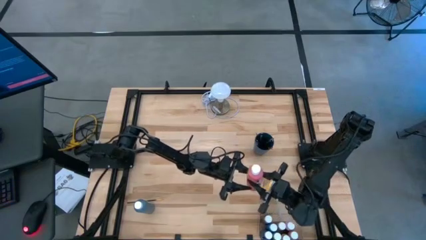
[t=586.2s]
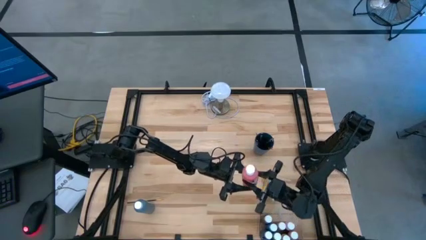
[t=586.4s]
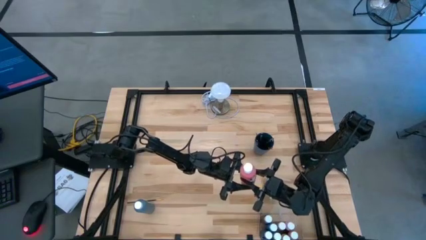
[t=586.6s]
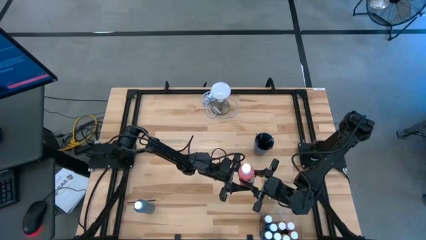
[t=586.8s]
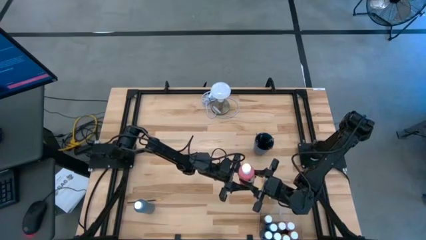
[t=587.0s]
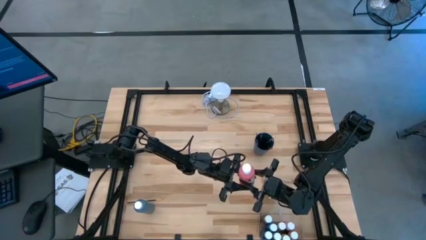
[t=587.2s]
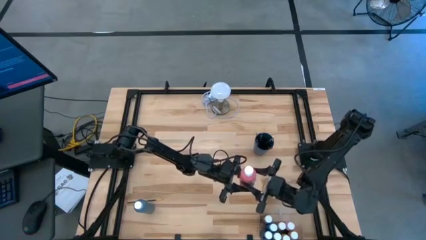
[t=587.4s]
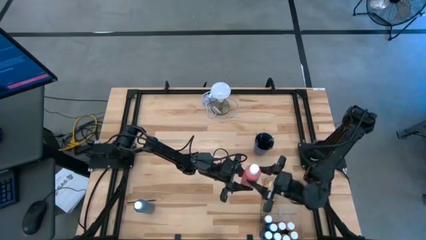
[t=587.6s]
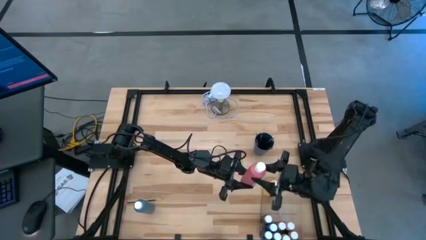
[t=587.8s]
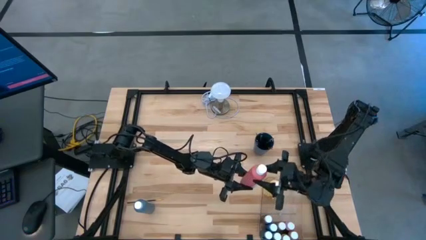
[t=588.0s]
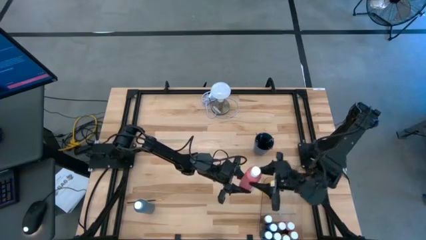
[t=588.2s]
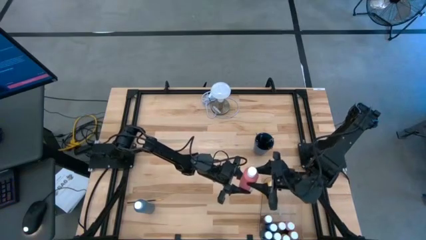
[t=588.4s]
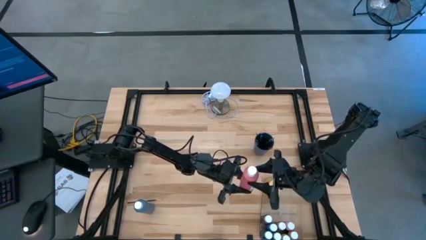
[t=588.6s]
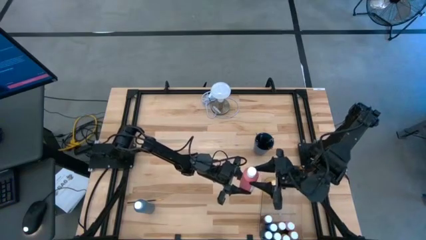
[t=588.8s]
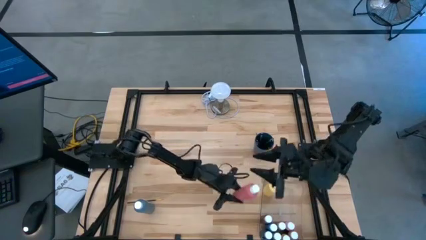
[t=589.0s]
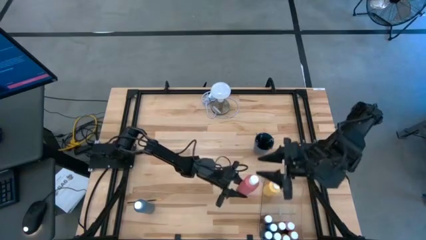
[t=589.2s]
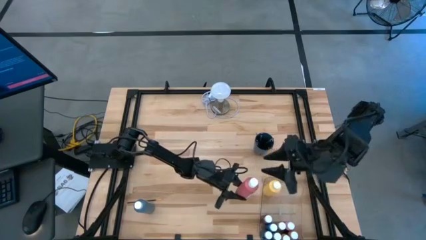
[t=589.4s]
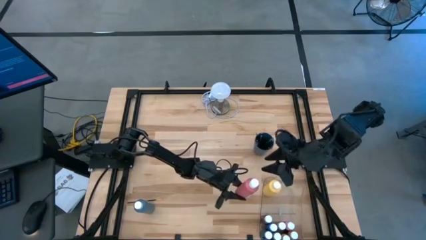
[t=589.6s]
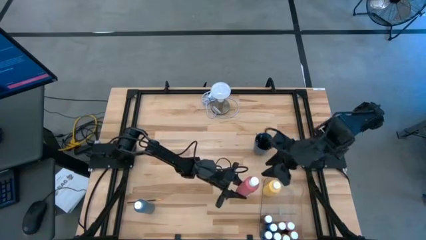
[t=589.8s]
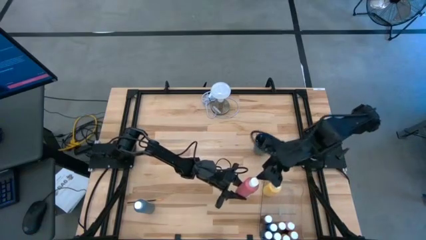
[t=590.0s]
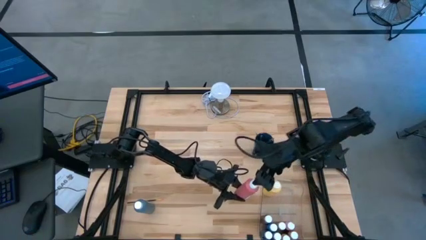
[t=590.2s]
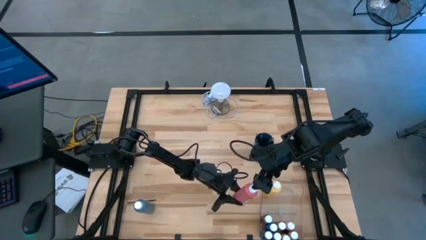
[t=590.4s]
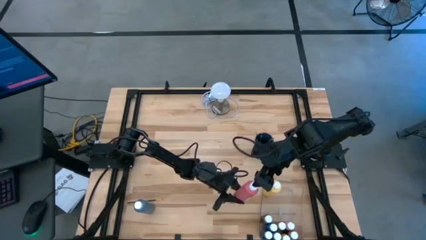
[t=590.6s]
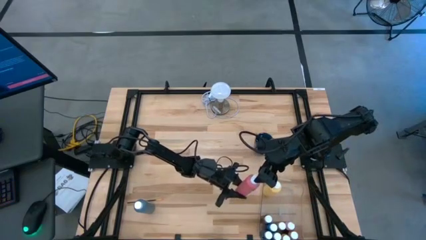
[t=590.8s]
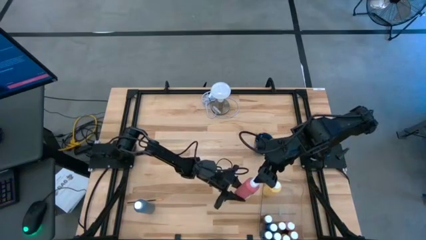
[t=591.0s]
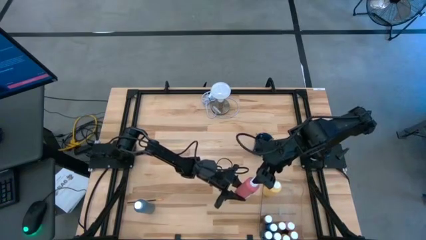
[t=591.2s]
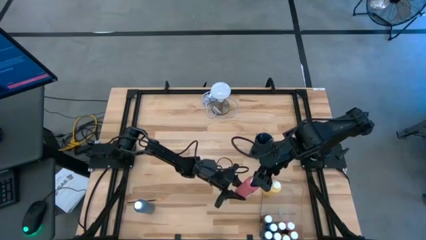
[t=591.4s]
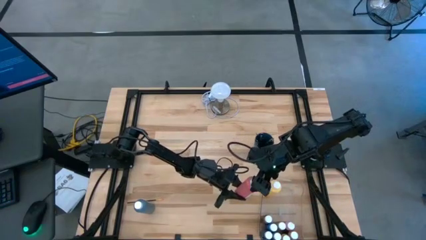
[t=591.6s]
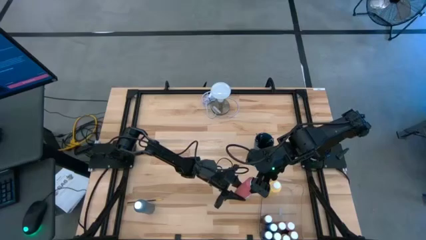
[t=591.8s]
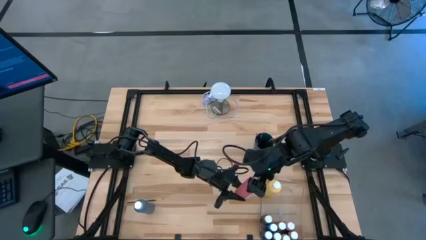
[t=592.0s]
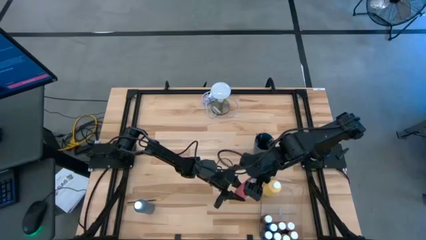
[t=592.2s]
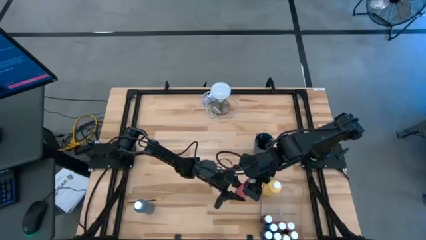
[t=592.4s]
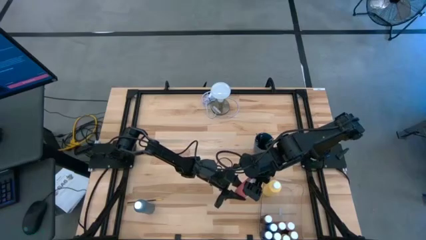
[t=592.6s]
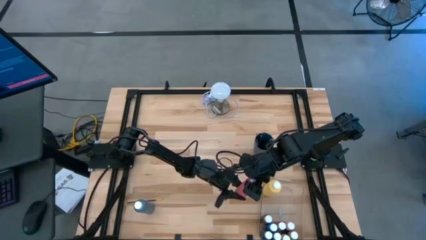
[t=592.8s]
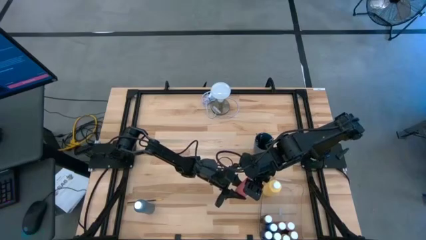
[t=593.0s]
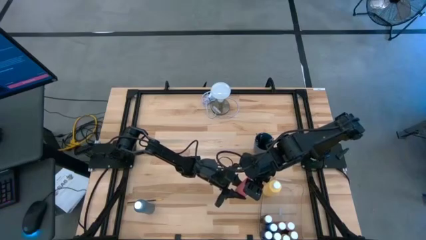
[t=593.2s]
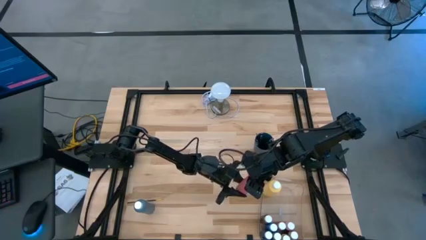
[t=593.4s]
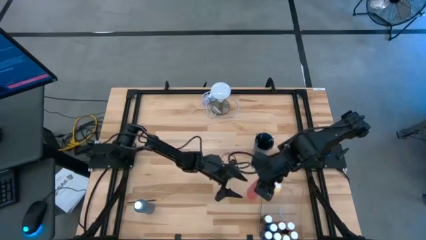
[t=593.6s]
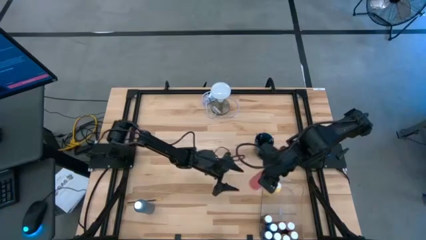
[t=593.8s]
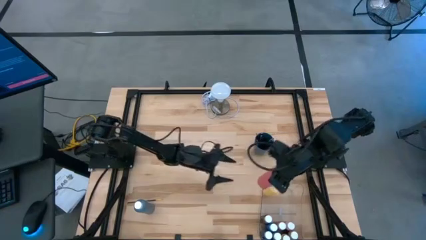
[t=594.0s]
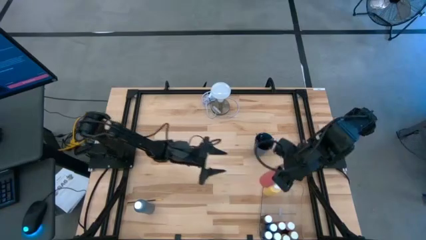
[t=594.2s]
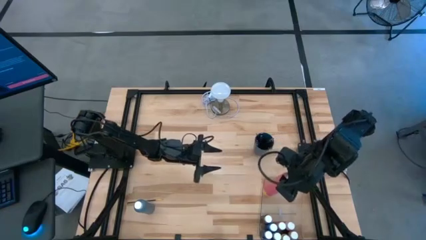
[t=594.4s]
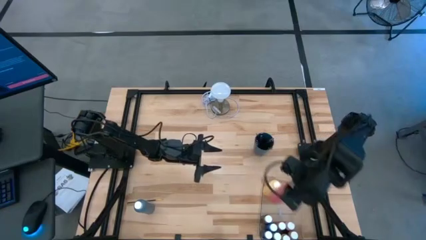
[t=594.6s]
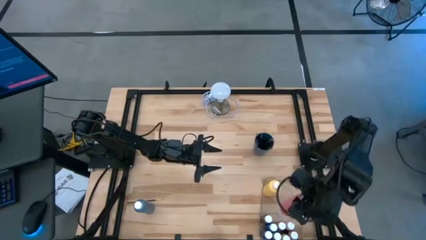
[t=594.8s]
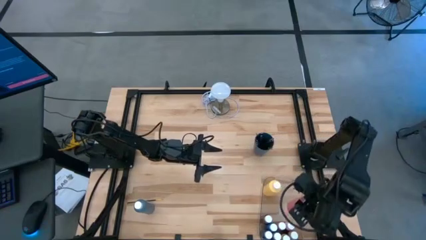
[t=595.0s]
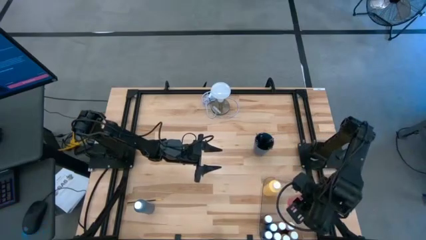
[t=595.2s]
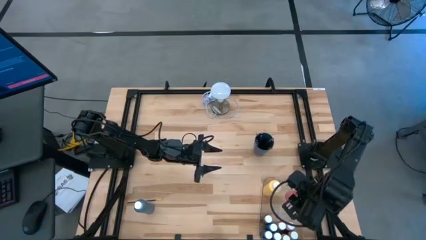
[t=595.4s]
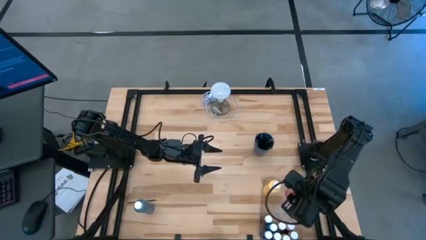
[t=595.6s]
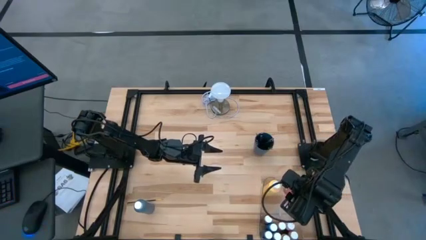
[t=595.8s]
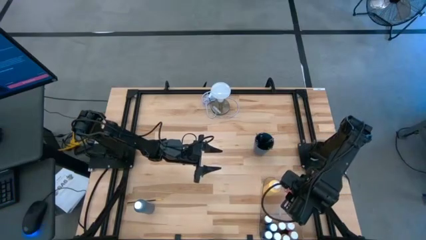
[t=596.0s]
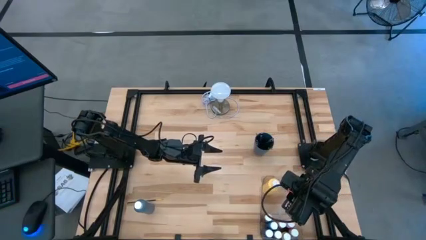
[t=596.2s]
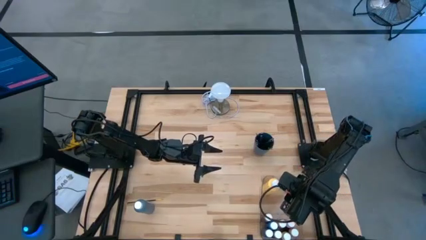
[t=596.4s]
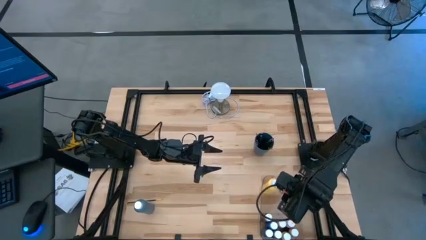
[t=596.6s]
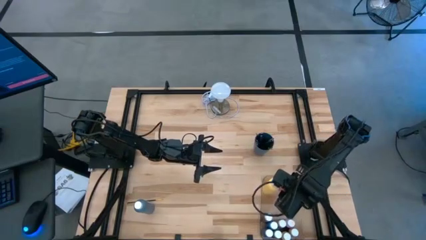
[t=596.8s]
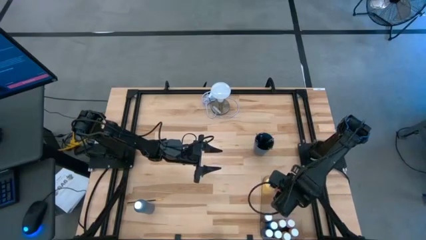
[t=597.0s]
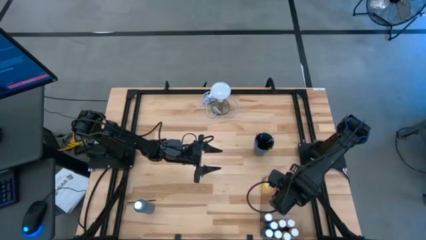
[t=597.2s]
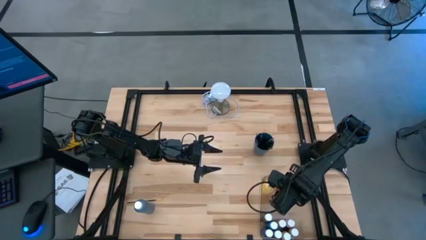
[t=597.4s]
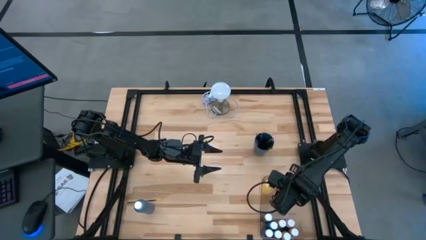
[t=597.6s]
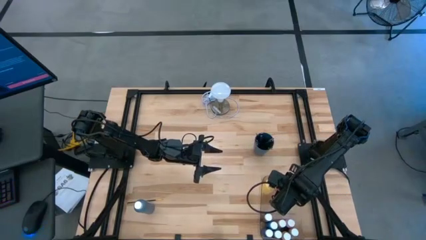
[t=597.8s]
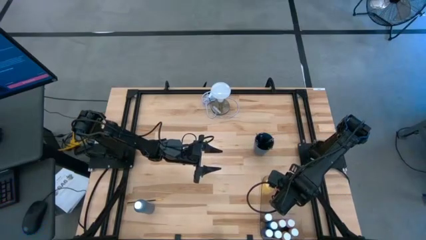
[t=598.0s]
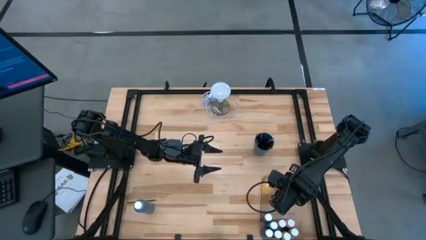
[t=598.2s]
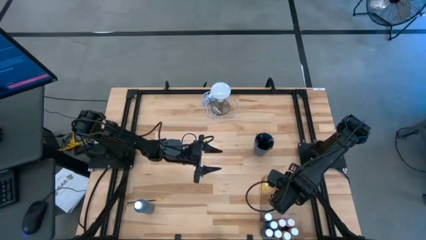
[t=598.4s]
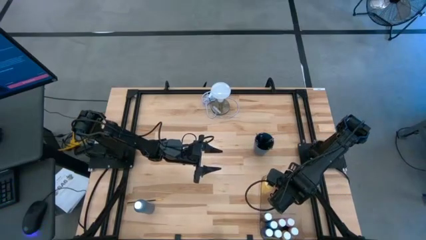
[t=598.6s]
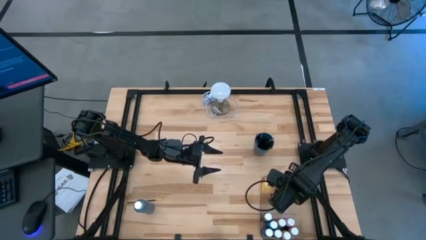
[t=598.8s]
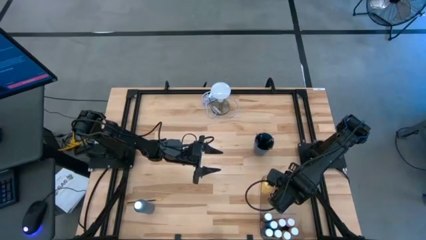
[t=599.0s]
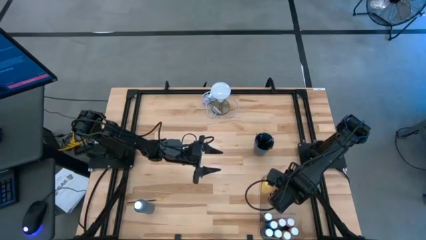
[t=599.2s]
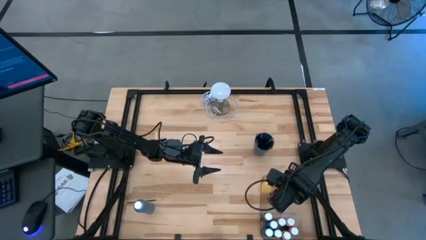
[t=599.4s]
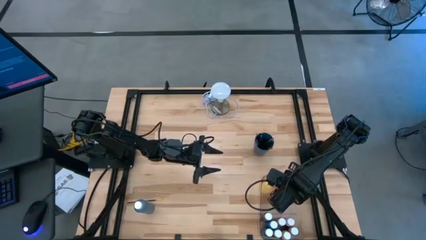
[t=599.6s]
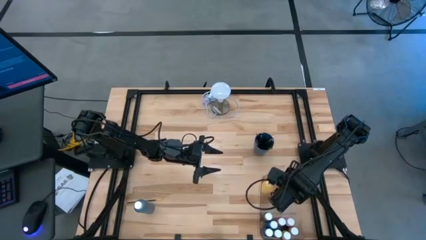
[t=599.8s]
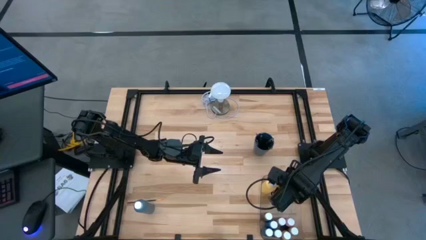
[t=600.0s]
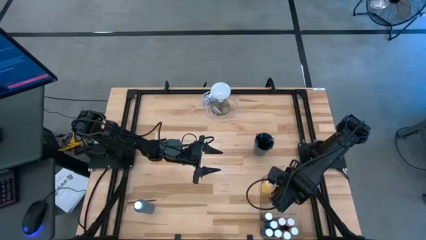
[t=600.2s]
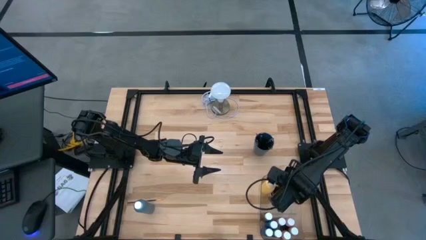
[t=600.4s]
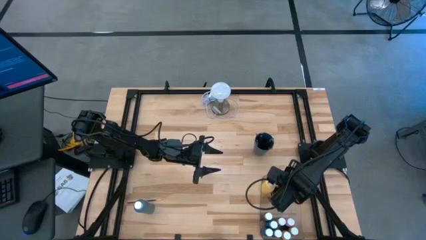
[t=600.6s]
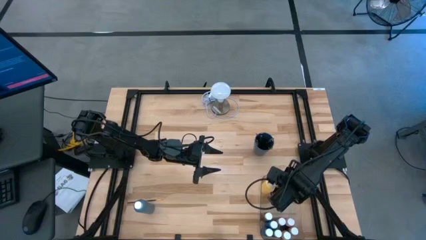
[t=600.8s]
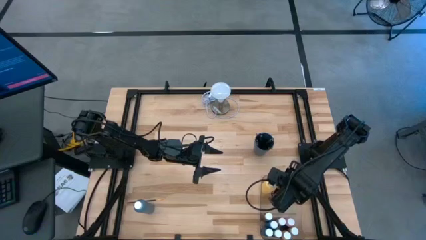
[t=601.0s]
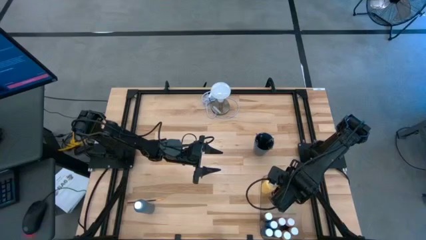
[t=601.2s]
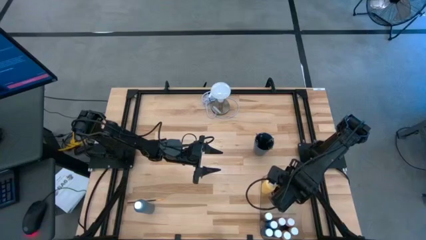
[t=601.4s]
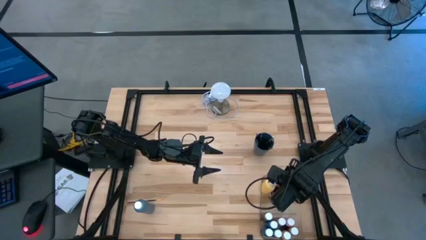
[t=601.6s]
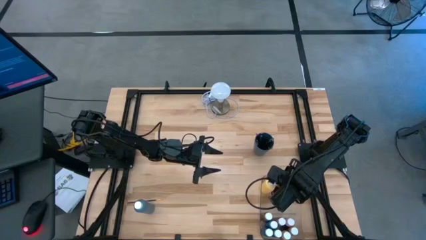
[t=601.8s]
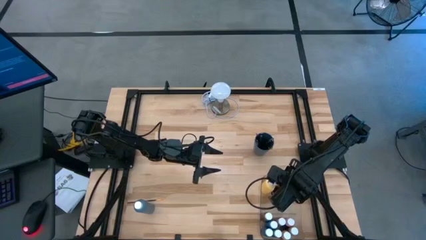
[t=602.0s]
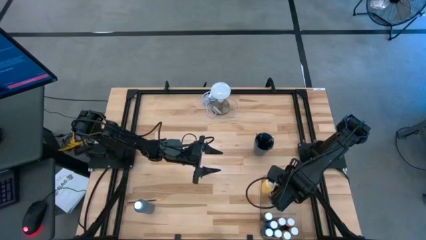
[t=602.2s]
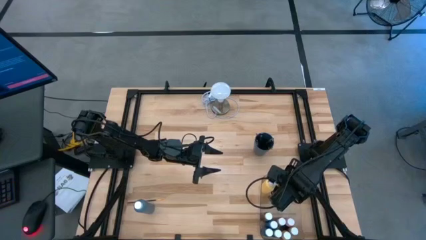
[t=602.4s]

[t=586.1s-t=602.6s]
Task: Pick & Place Paint Supplies
Put the large pink paint bottle into the transparent bin
